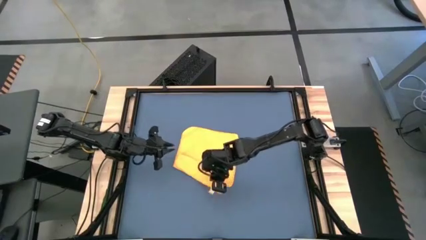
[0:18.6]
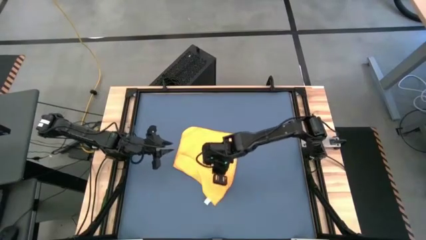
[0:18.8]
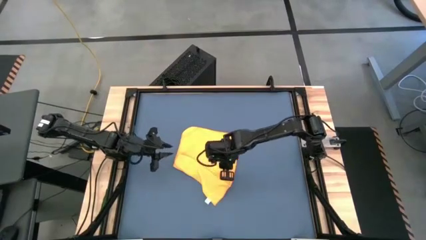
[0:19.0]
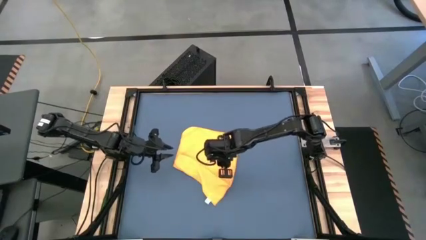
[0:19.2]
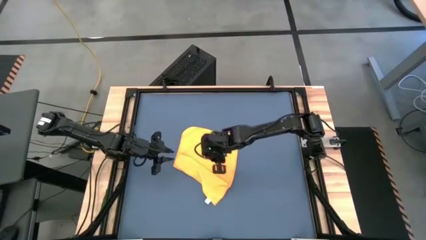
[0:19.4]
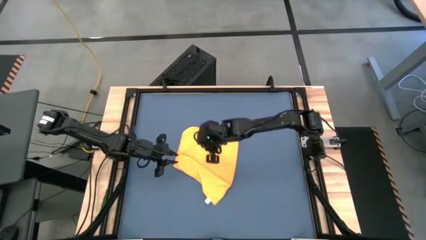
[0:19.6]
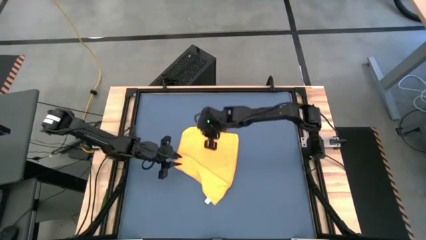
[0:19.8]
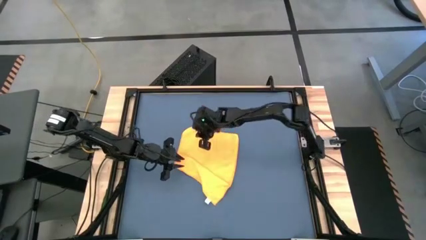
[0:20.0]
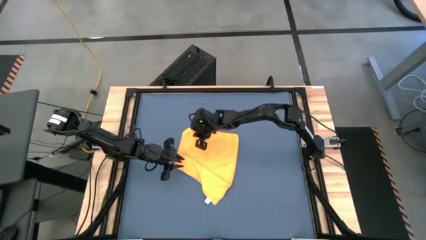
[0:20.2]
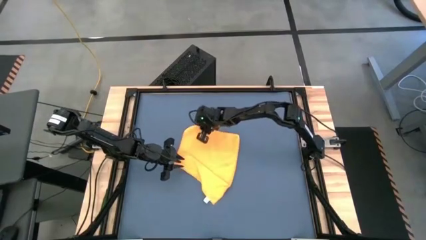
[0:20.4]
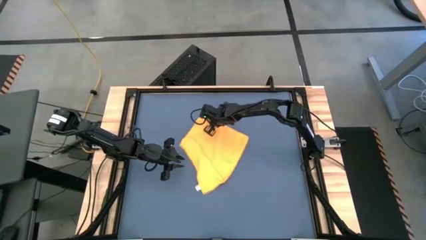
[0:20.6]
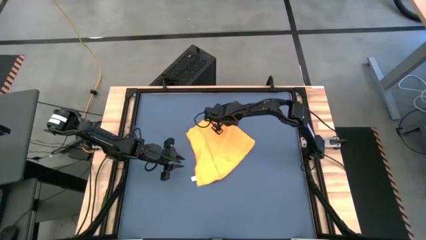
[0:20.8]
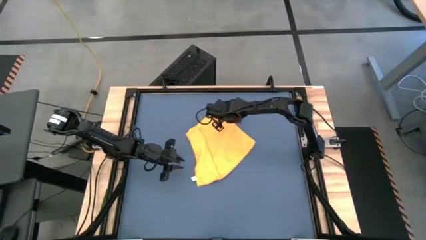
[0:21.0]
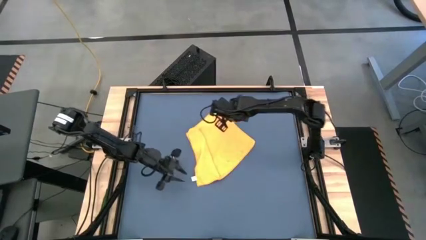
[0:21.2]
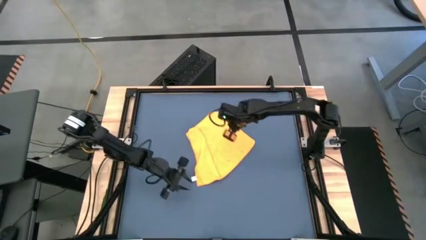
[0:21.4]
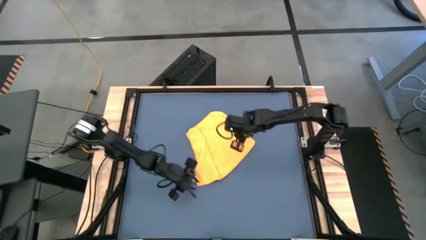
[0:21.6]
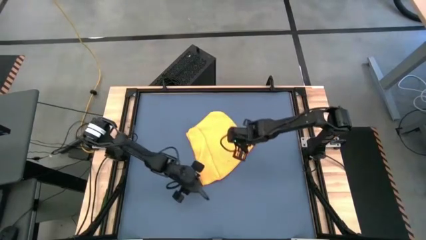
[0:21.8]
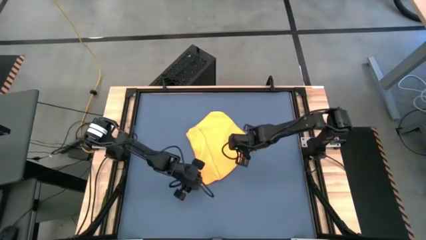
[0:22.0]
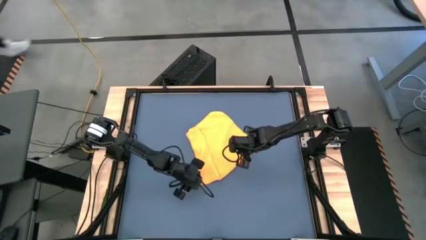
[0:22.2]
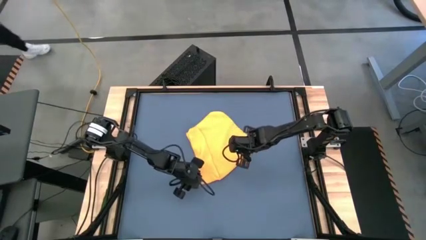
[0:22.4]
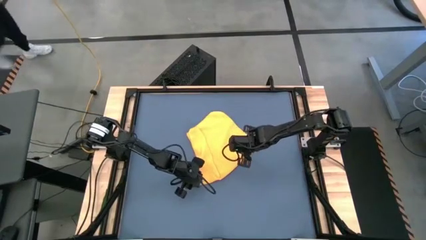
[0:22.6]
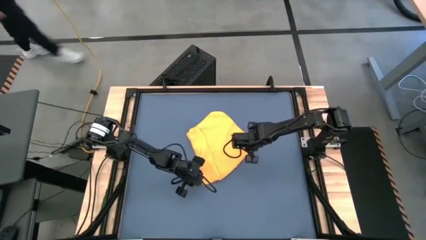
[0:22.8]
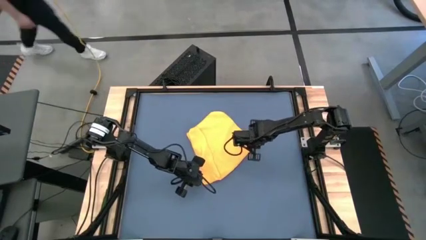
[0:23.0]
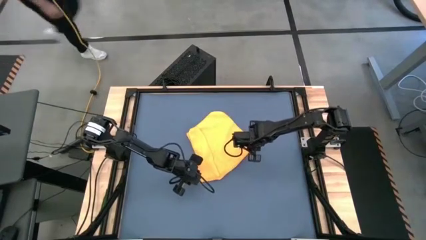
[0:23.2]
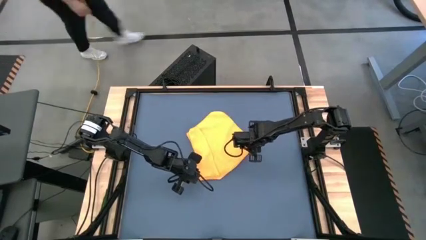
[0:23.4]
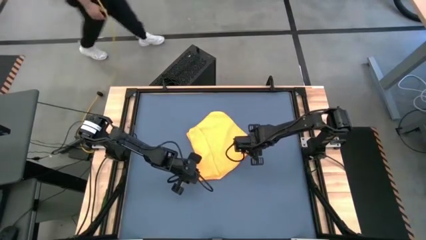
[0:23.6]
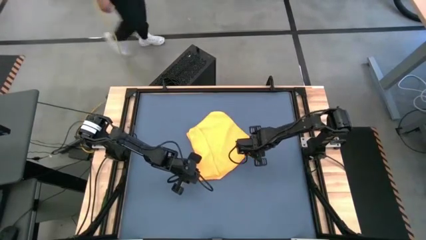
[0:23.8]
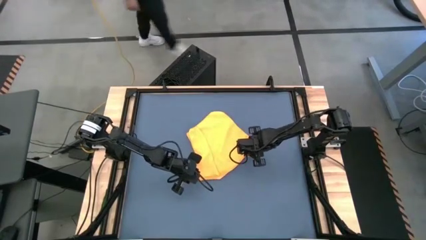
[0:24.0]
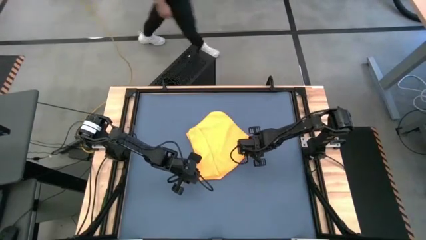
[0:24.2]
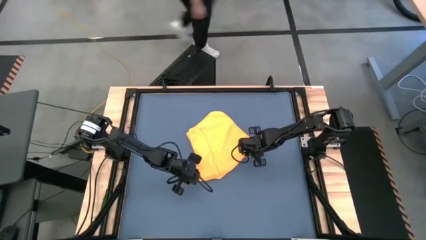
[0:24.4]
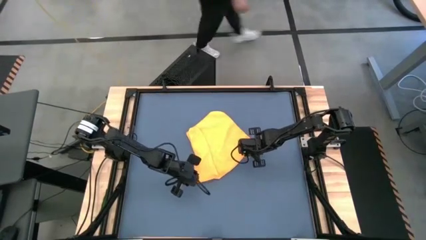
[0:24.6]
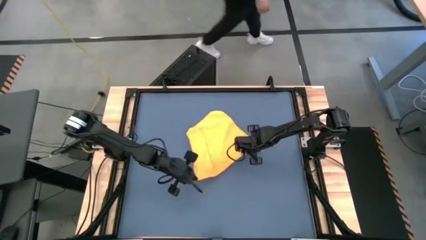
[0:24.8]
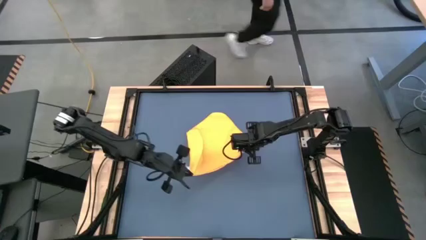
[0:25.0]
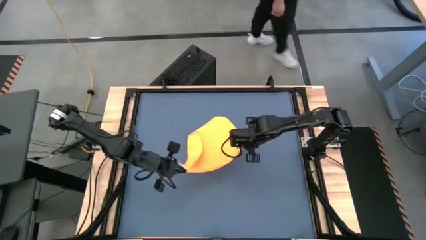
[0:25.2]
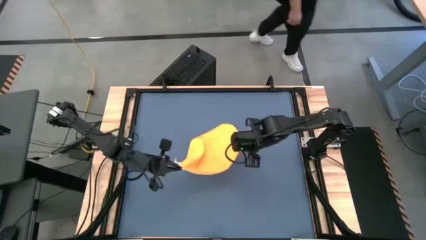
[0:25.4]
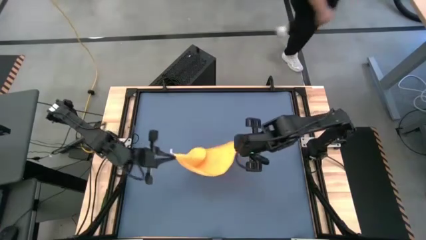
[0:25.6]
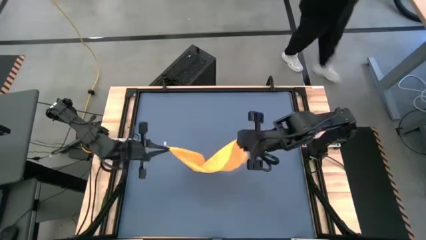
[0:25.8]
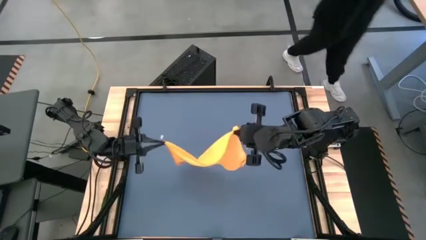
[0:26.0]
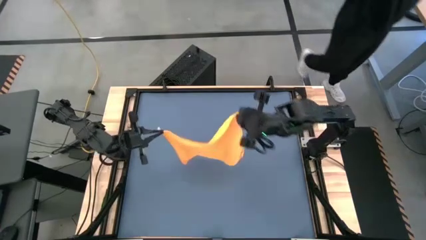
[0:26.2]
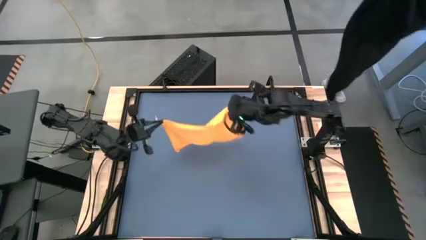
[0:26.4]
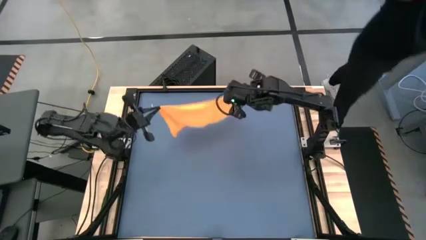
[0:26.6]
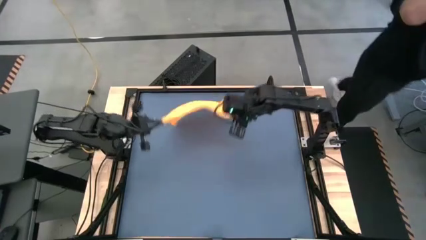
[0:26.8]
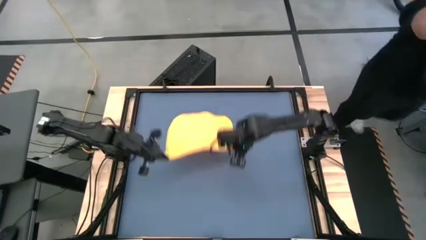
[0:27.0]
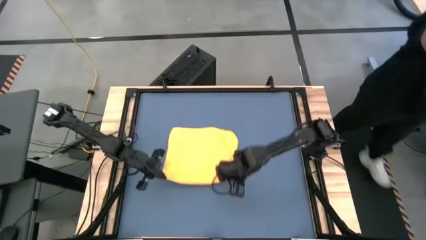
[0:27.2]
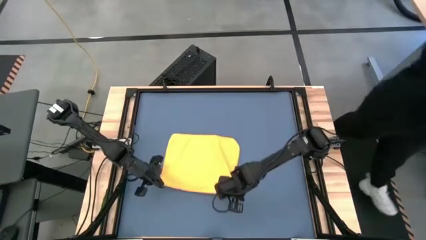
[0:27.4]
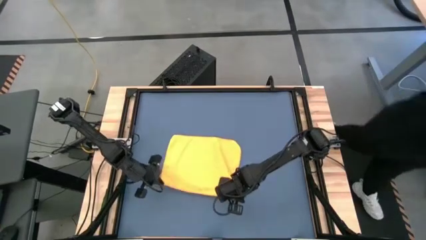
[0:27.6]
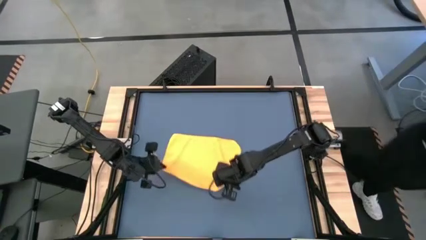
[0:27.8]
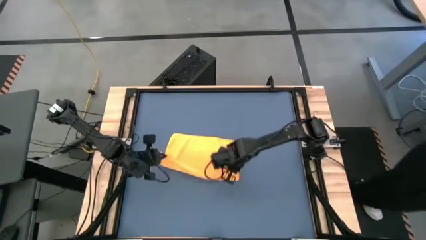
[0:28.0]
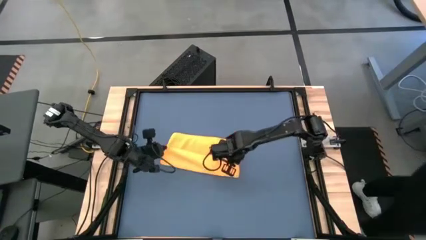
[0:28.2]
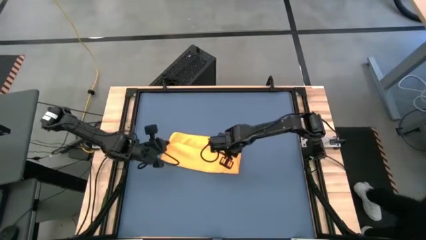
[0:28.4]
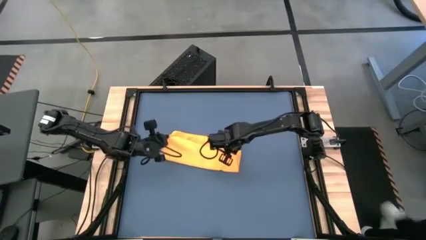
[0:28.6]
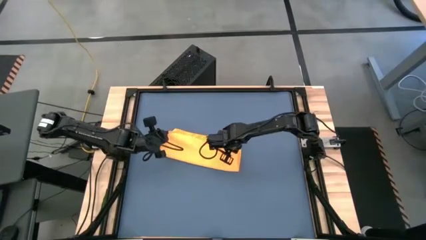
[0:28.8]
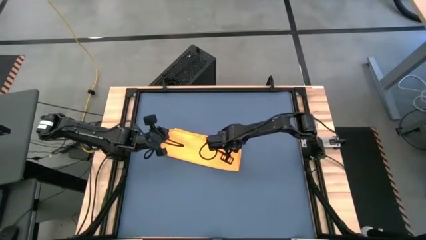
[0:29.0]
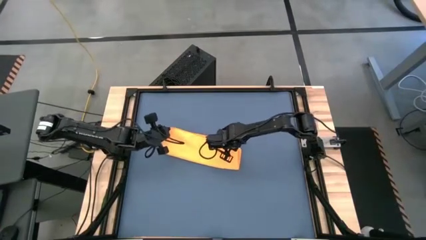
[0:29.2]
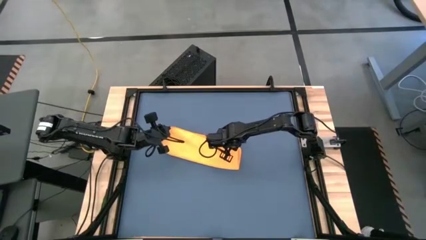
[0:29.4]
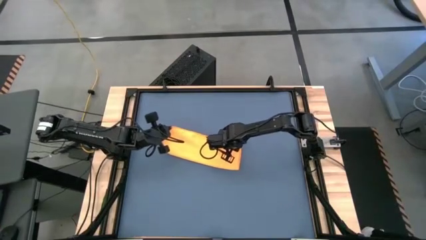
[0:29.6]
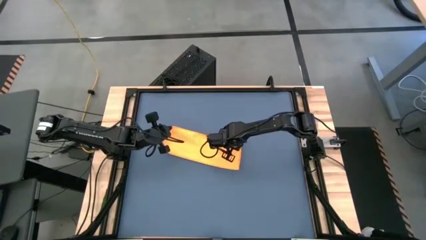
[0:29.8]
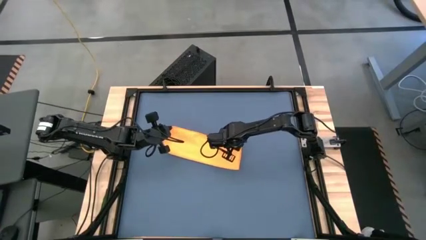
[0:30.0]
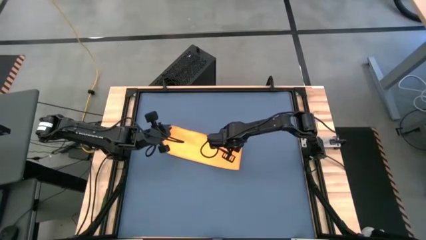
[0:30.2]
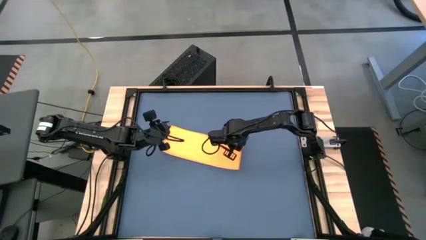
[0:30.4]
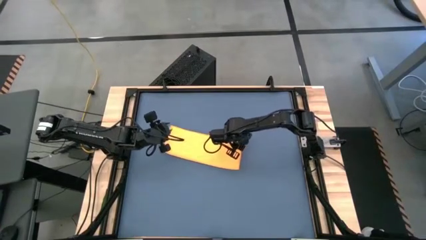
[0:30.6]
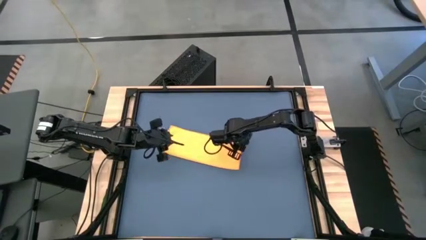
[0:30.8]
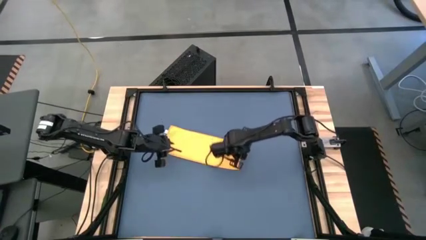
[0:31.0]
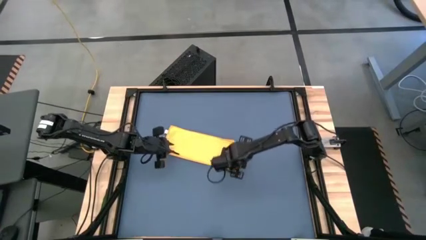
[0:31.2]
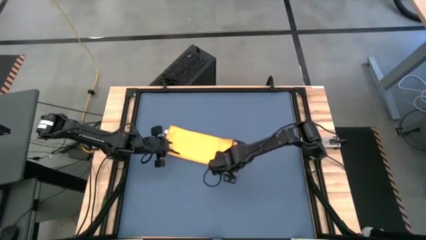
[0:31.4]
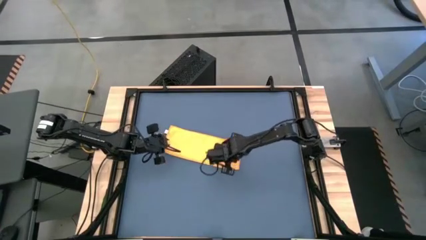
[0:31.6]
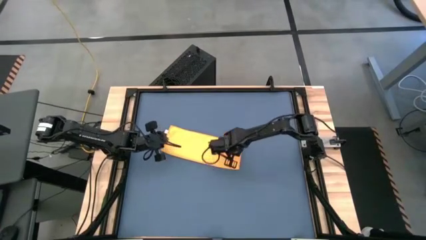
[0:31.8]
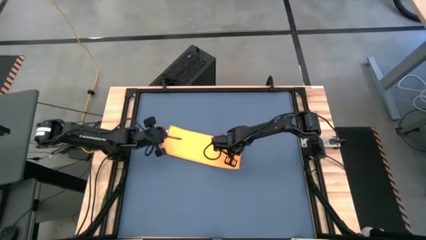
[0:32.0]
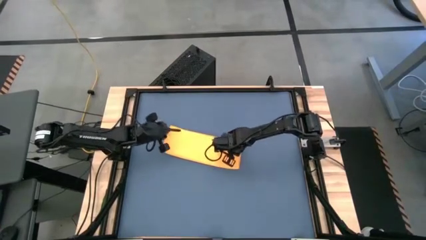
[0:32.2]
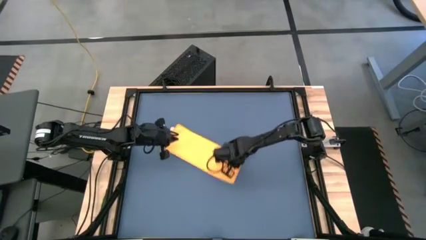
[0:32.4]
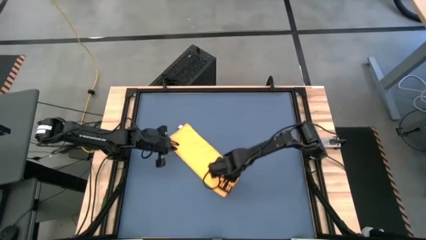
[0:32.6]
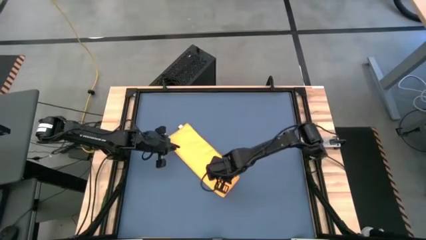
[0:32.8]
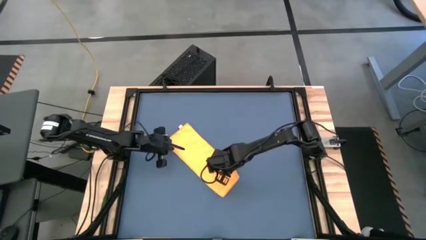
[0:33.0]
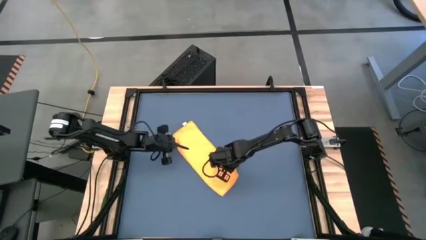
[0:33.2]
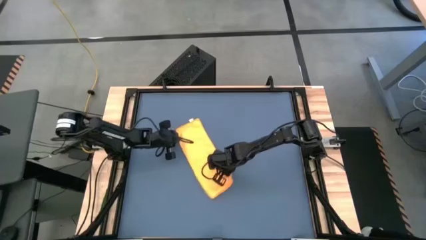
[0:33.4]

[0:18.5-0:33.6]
Task: Roll towel
Fold the yellow microfiber cloth
